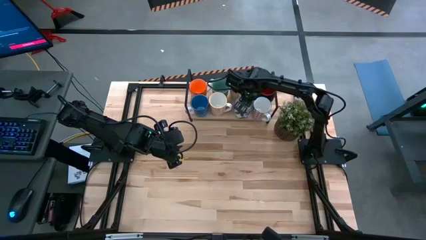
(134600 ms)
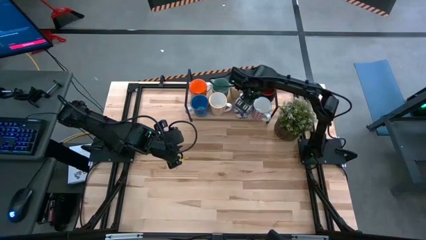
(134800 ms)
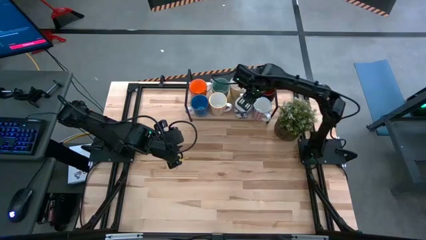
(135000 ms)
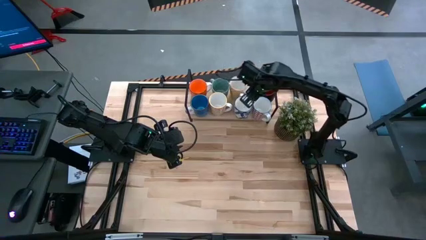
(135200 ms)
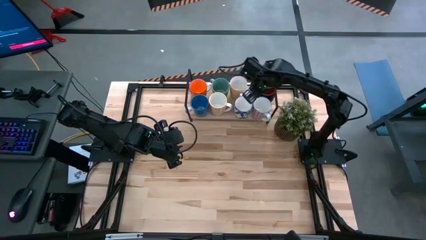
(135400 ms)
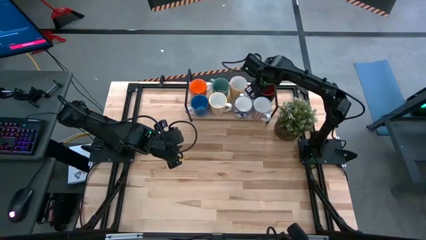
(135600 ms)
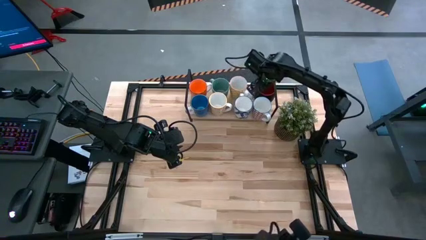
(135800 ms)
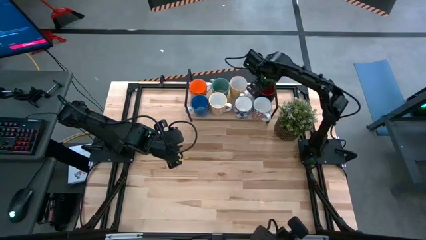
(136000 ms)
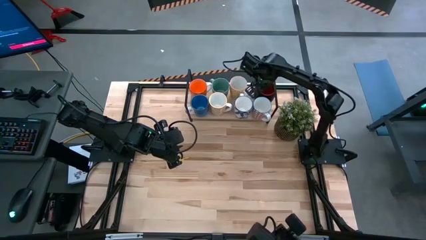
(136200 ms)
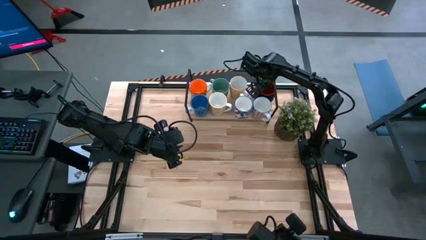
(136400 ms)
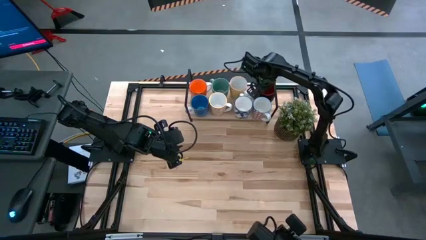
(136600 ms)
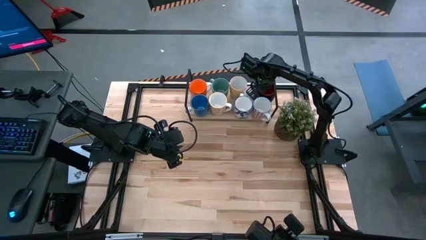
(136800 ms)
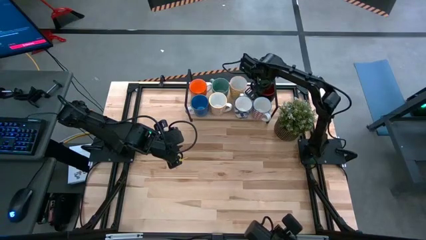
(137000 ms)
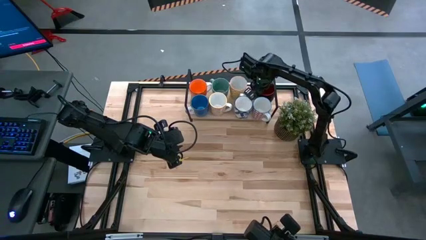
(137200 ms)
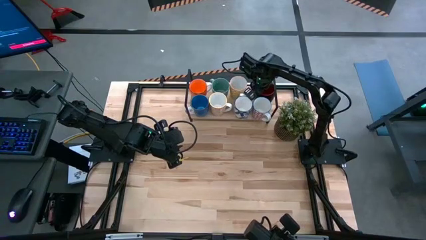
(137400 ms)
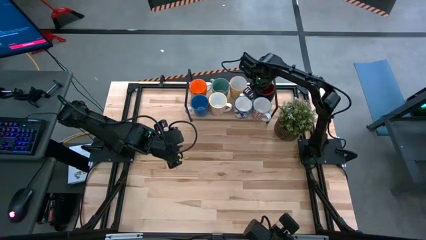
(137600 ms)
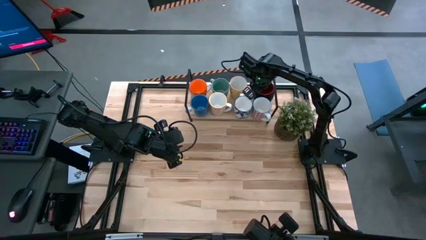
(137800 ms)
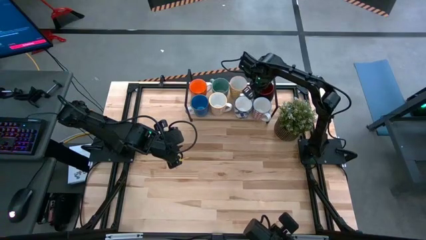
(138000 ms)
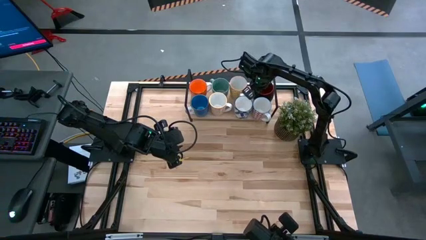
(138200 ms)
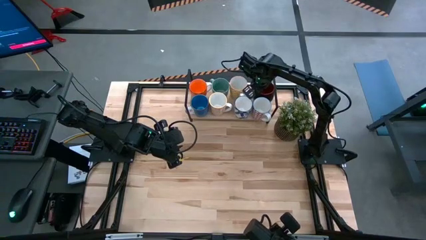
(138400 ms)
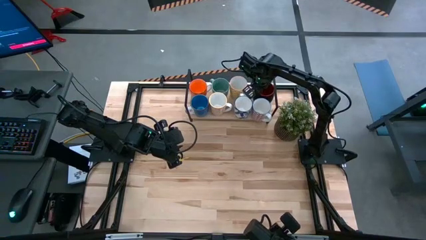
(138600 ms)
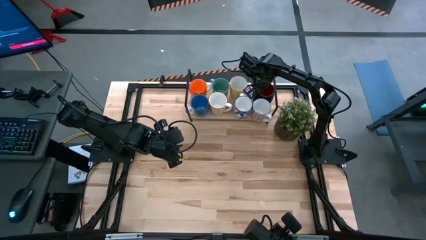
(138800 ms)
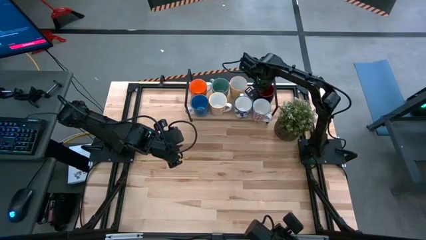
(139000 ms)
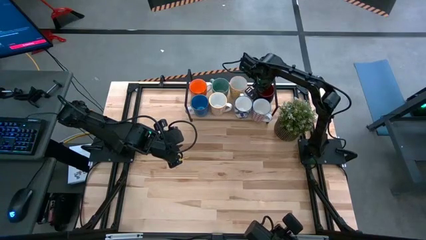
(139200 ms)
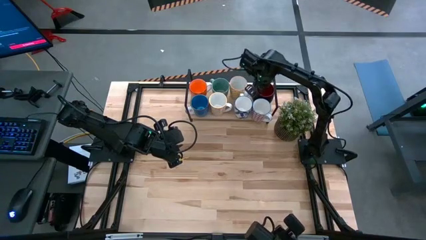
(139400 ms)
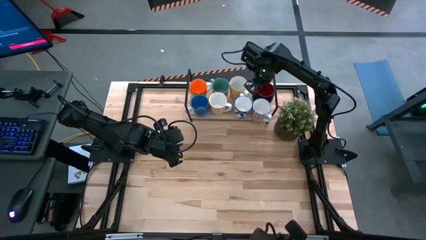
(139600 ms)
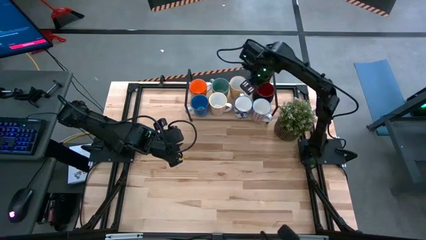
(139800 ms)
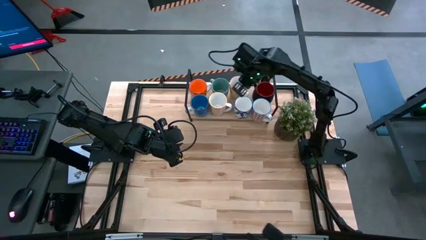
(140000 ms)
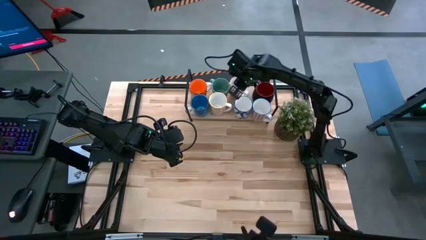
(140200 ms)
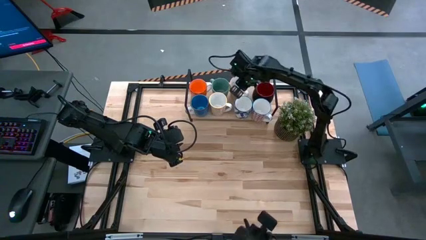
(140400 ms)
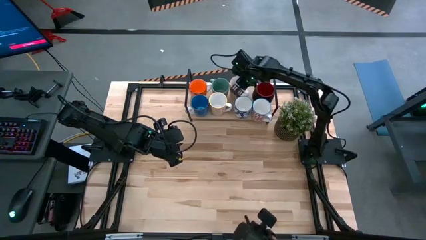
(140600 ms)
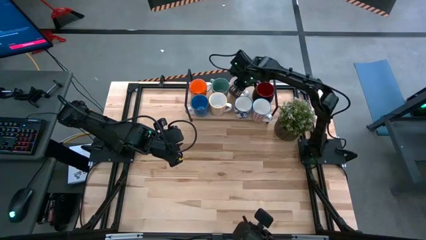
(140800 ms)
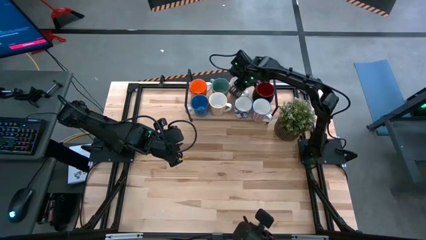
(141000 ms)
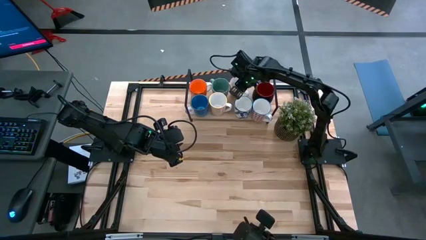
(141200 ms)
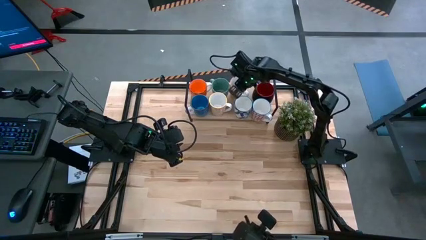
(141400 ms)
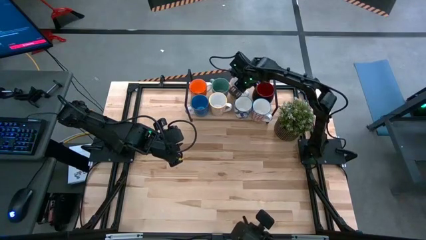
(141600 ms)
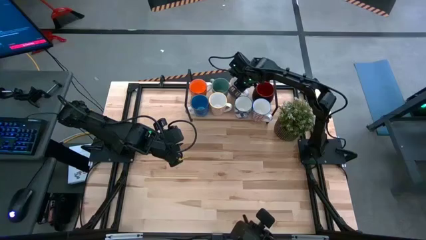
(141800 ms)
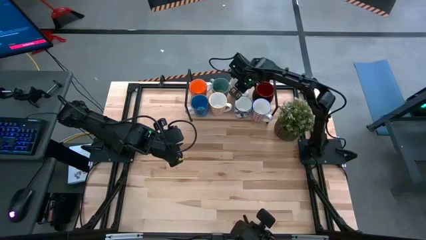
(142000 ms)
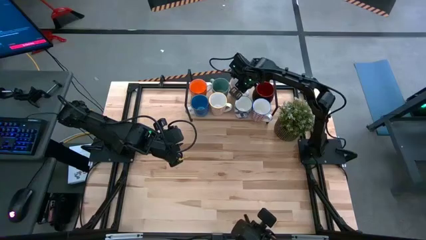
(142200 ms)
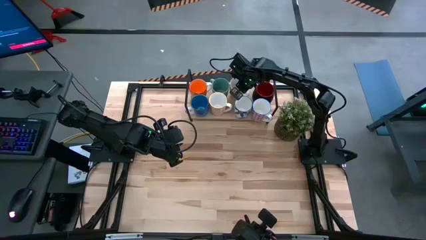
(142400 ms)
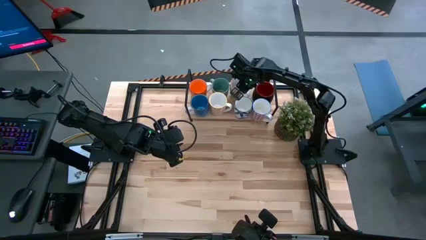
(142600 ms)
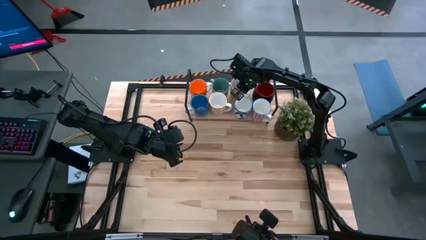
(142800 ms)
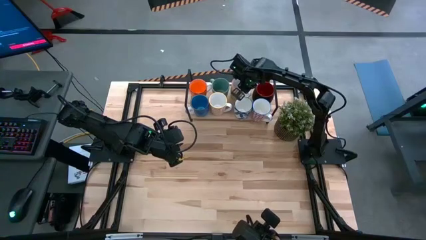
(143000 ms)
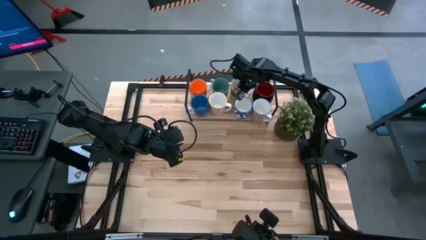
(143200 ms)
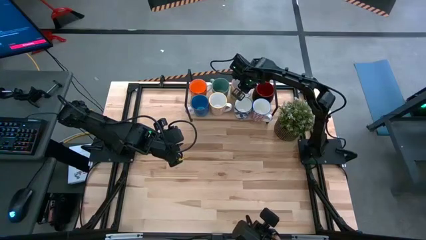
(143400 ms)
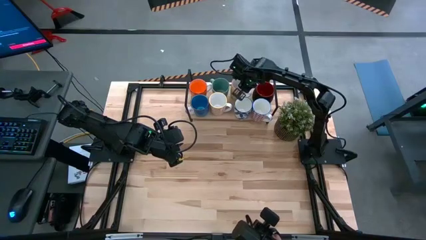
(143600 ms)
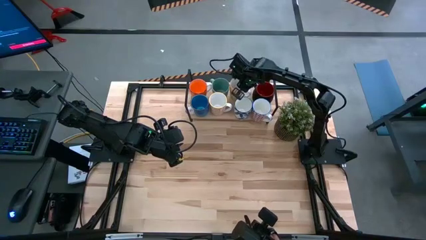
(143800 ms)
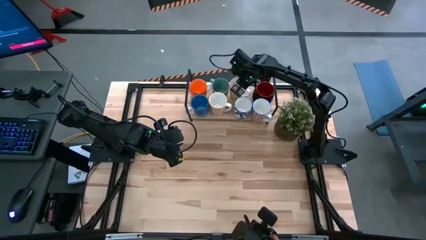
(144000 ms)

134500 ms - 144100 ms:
Task: Place coffee mugs
Adjust the mugs on the shelf

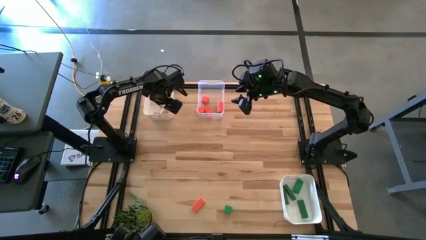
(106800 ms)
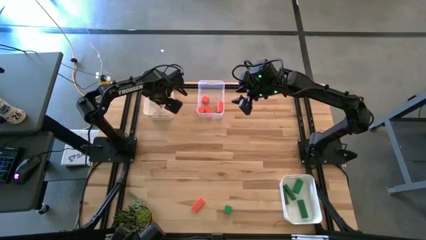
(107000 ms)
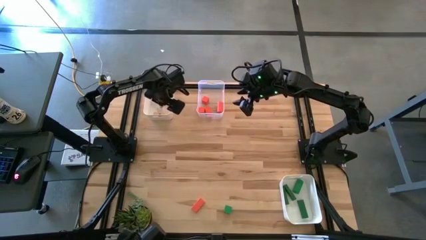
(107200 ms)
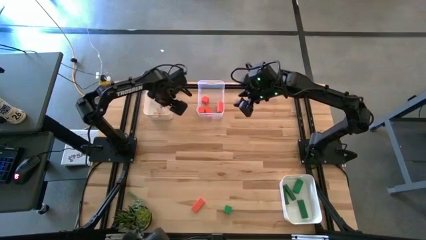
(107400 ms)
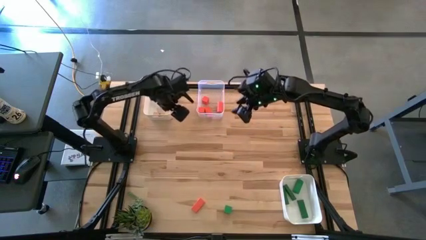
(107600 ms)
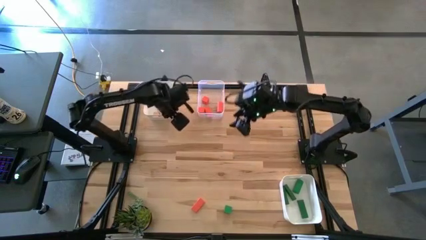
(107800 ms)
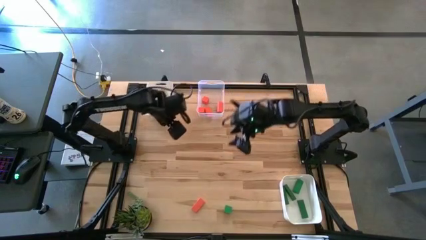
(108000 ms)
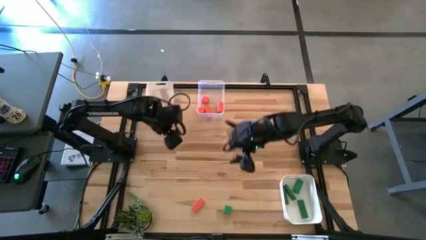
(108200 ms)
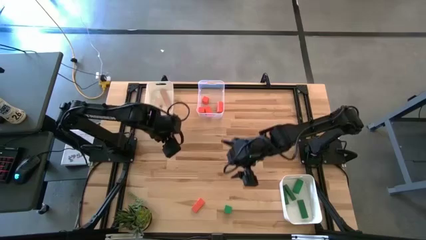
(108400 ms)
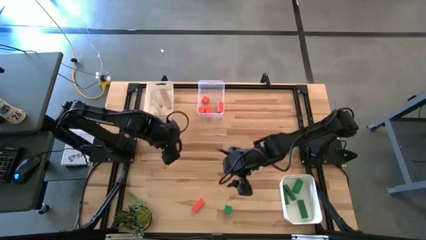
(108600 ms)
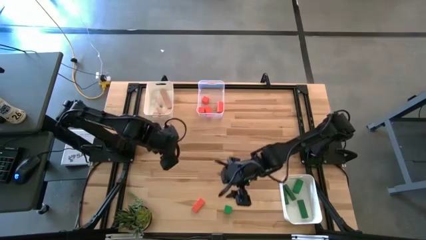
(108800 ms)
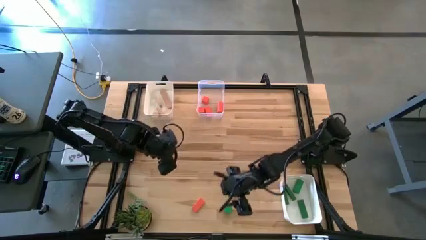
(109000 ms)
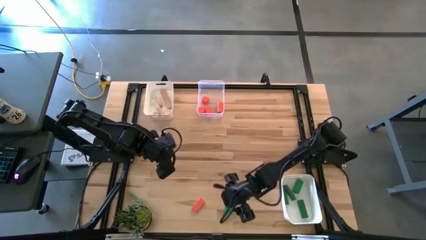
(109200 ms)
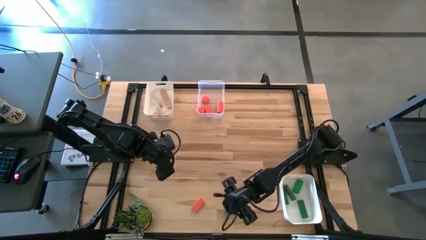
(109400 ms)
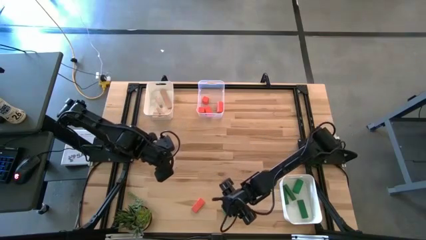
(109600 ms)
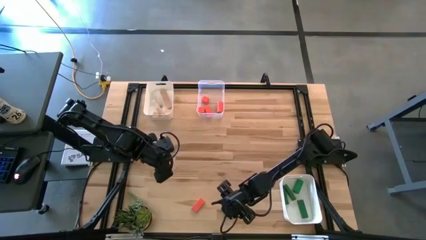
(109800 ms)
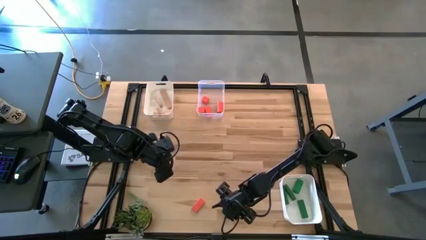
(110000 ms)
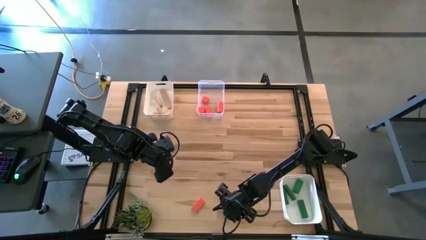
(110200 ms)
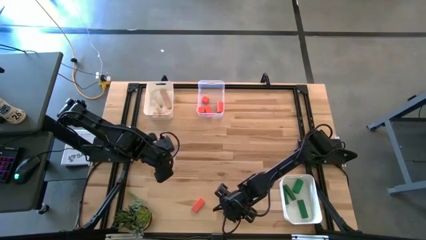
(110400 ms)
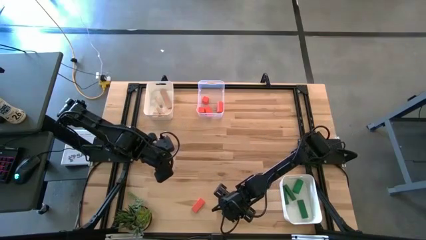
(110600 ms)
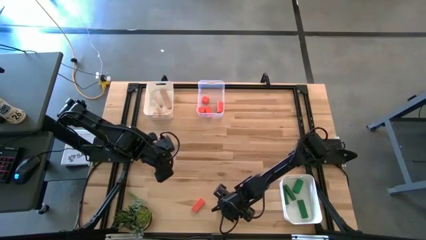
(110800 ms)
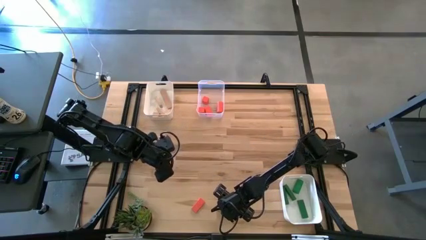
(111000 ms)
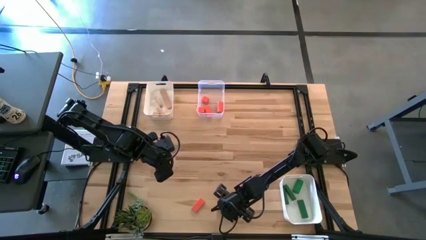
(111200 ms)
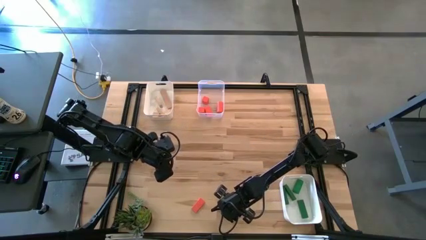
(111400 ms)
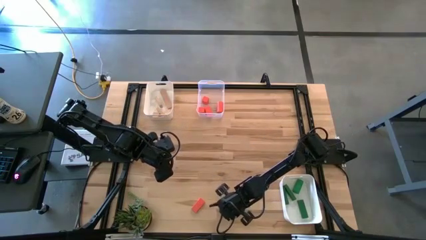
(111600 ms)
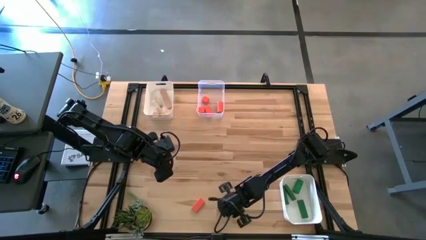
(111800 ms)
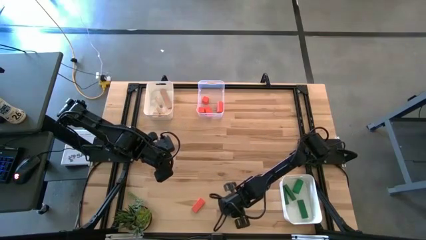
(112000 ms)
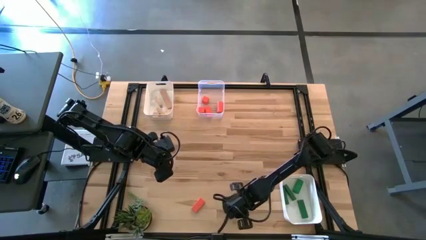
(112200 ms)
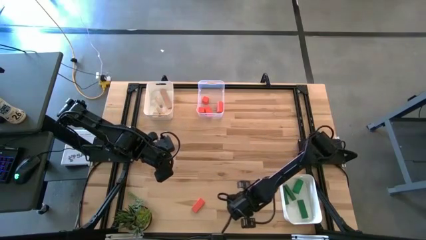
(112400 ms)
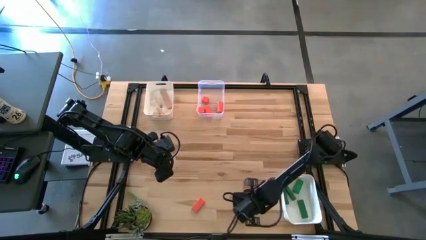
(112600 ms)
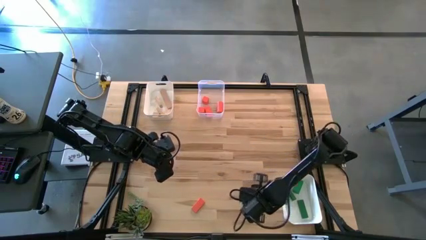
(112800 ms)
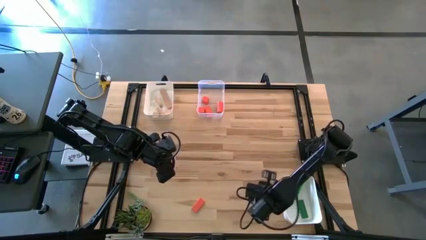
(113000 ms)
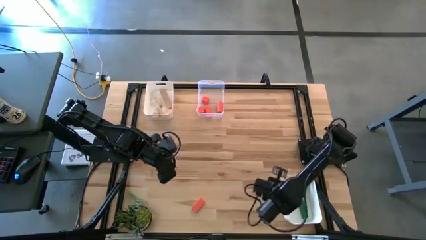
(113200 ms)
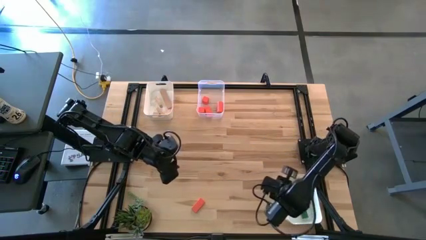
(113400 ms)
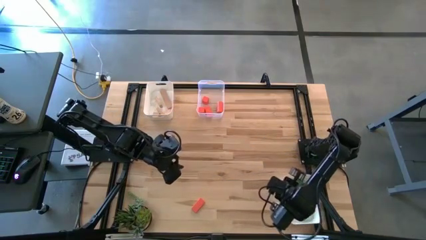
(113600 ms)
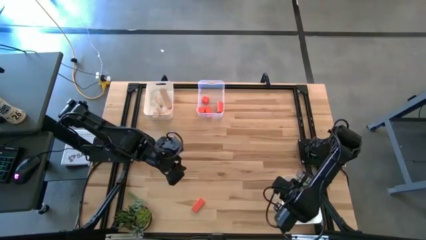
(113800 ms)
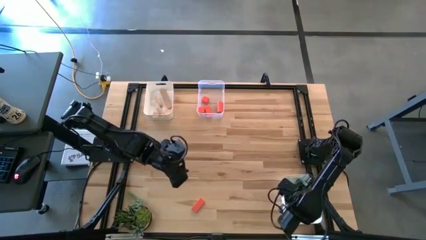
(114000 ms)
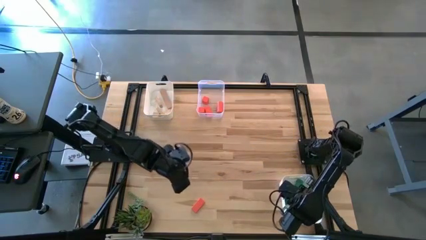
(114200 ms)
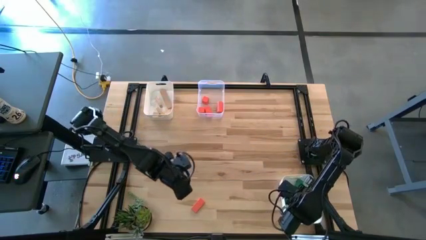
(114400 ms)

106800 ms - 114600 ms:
Task: Sort & place blocks by color
Put the green block into the bottom white bin
